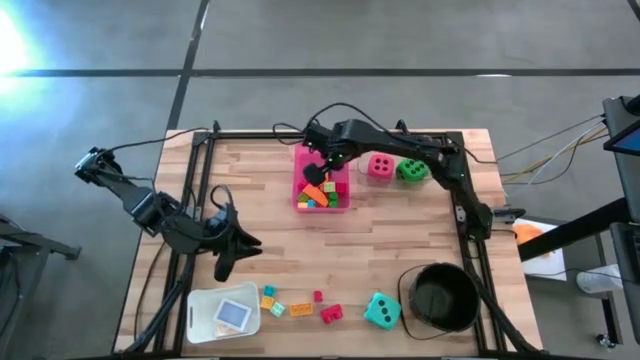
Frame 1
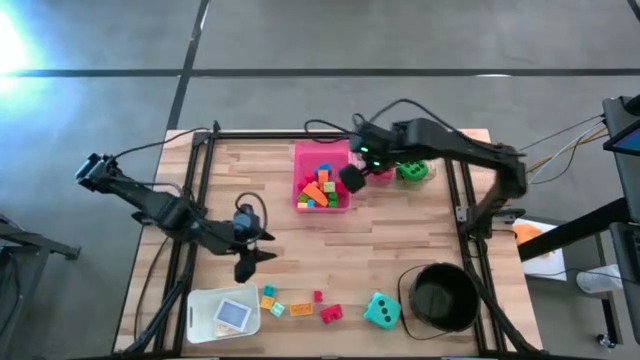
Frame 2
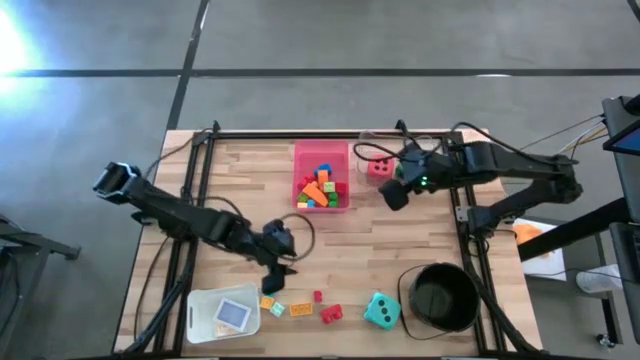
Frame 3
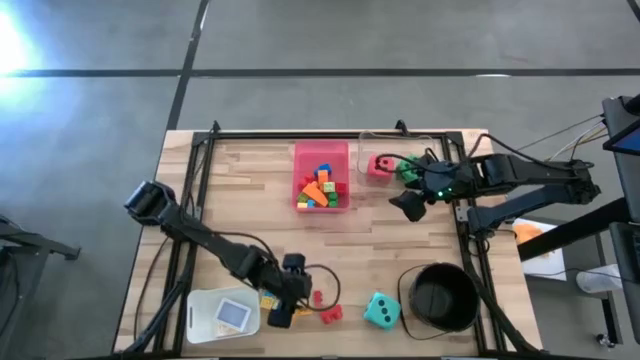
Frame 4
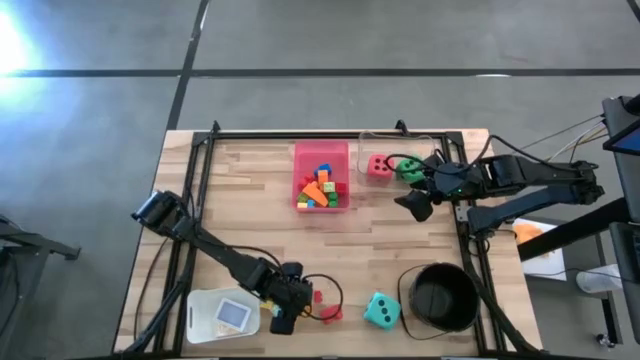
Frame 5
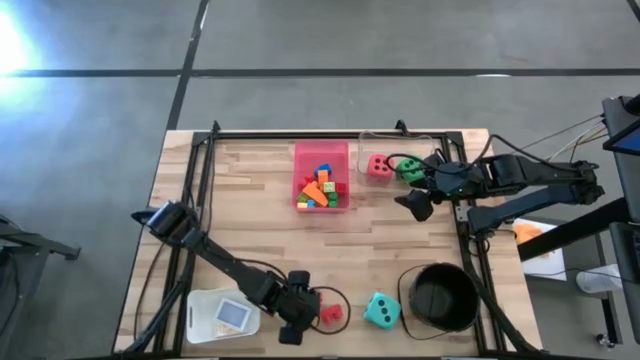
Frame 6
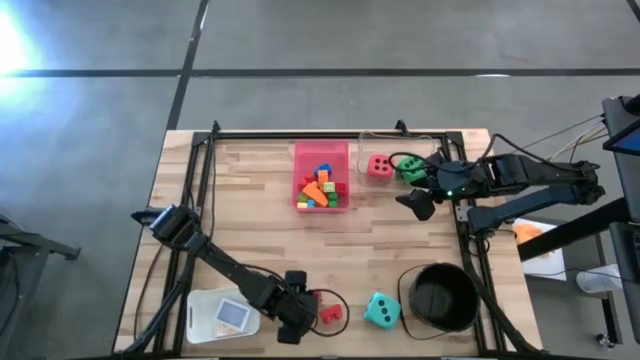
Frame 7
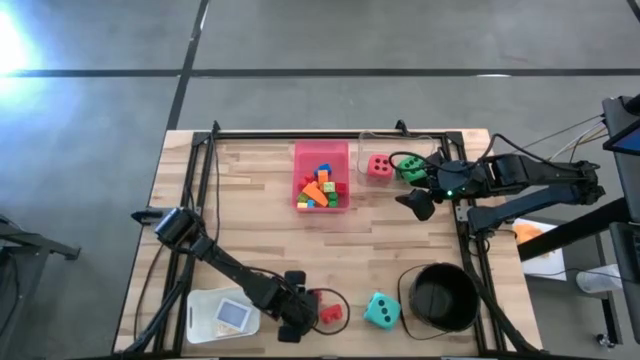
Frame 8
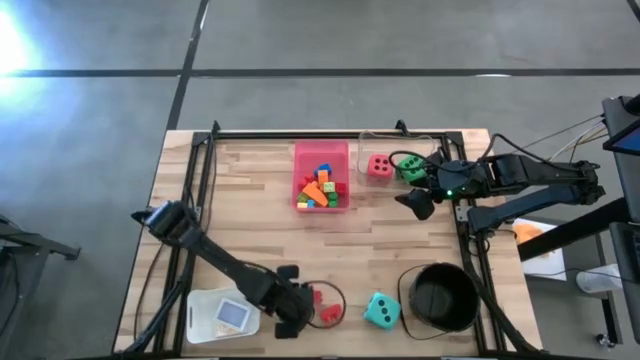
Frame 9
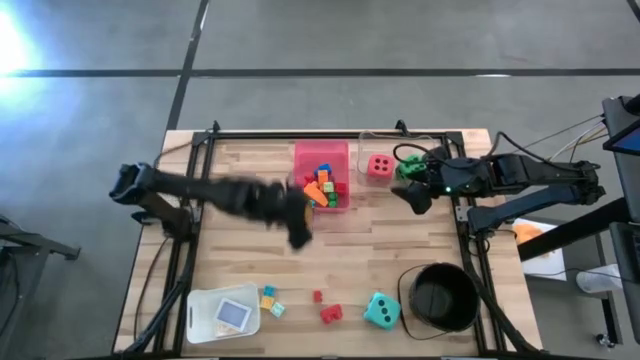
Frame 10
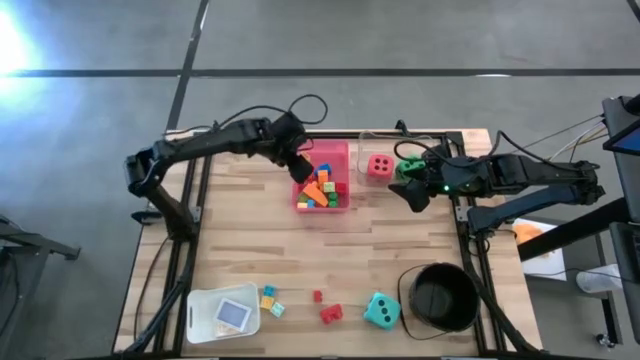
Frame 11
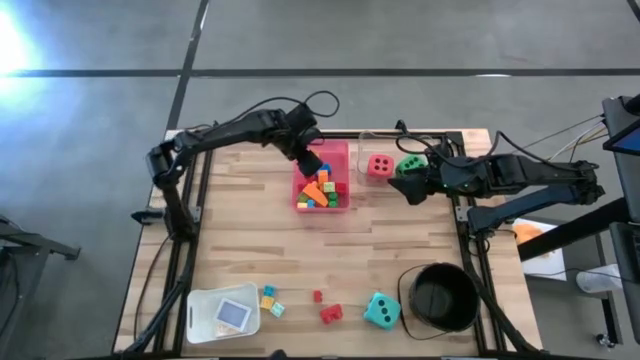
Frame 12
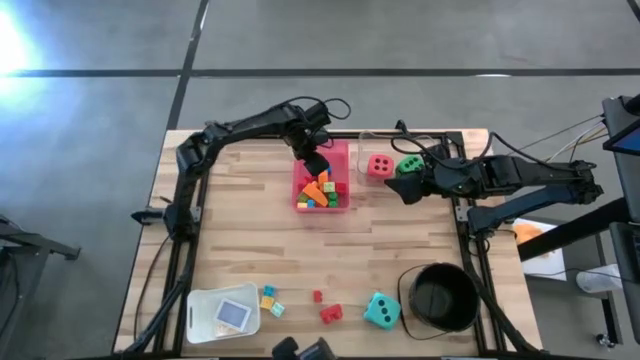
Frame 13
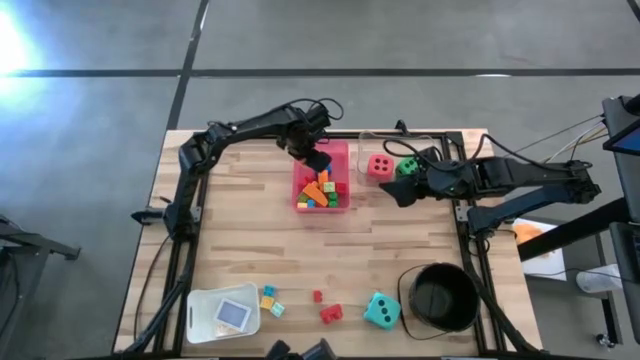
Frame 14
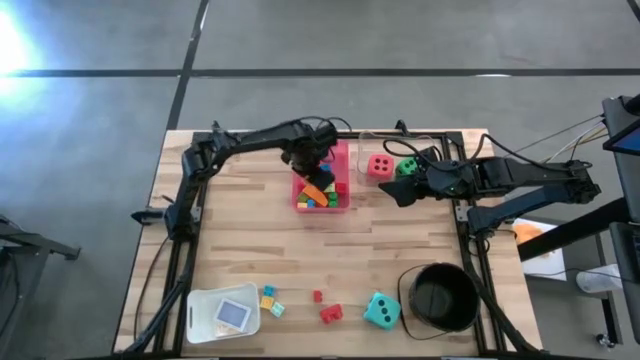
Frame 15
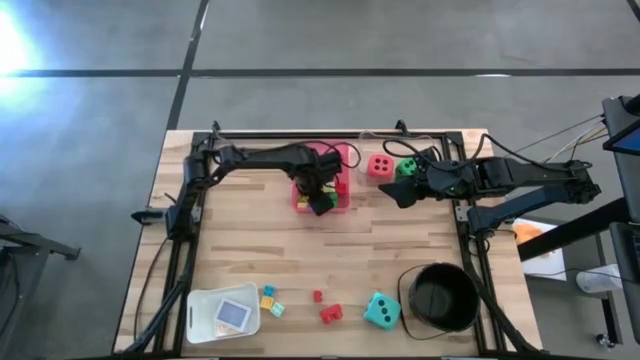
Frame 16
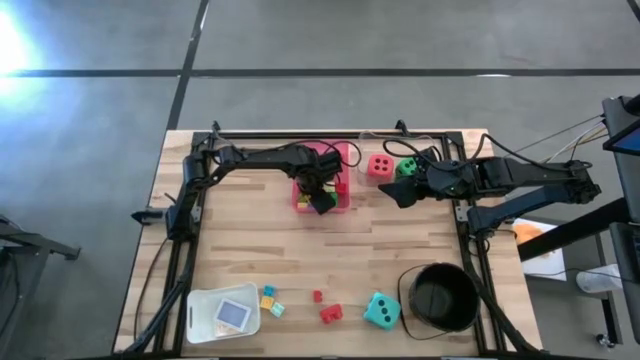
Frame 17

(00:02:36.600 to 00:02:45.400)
Task: Pick & Place Toys
Put the yellow game piece into the red bin

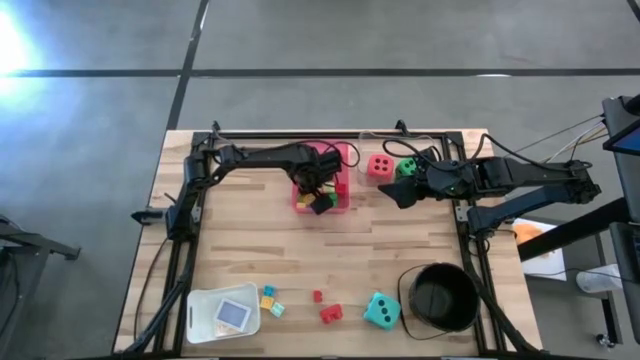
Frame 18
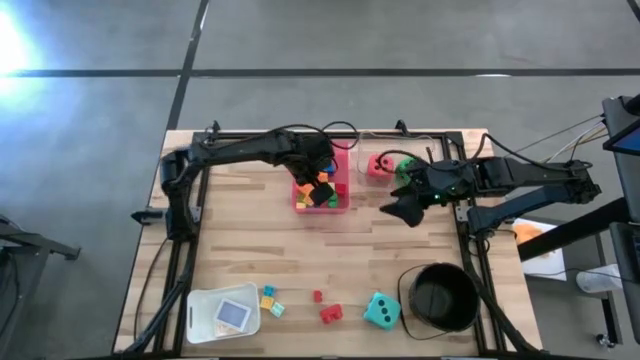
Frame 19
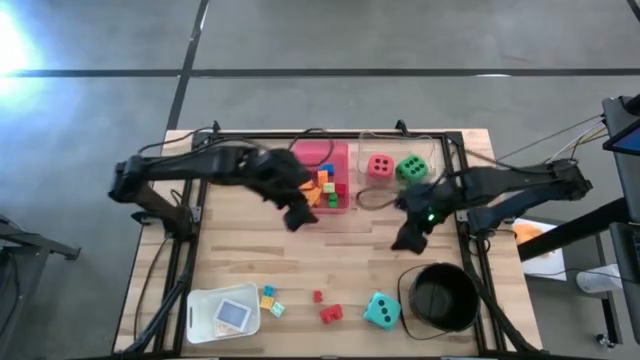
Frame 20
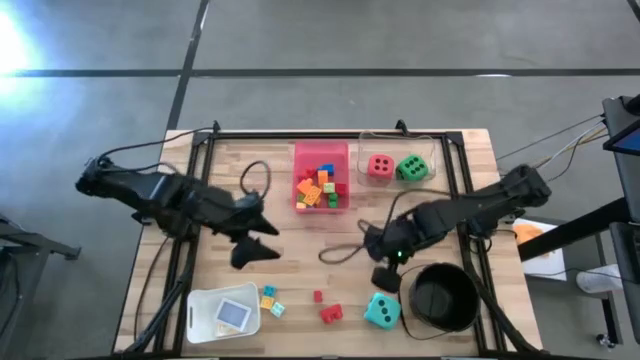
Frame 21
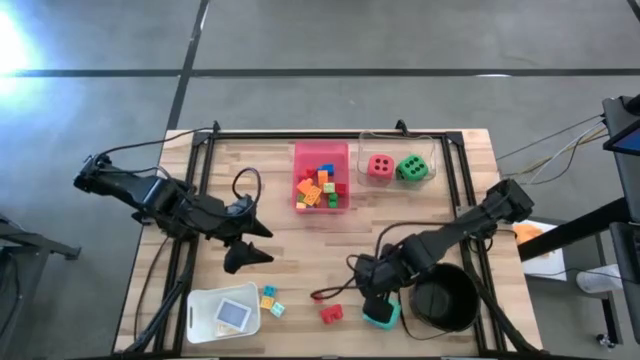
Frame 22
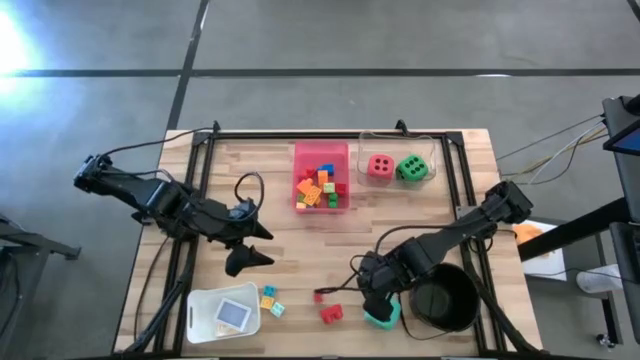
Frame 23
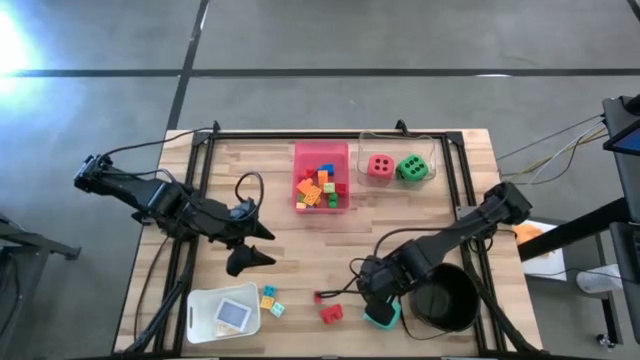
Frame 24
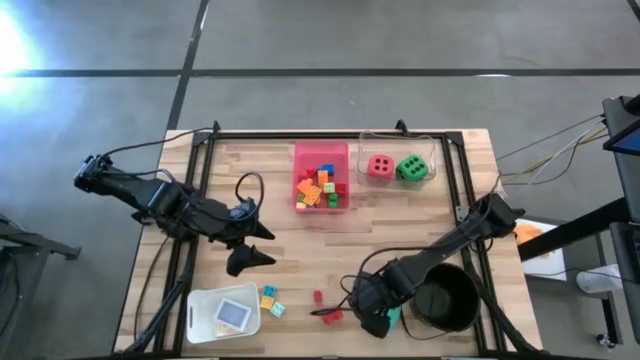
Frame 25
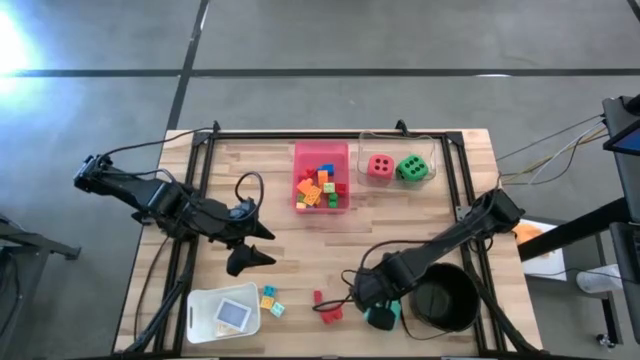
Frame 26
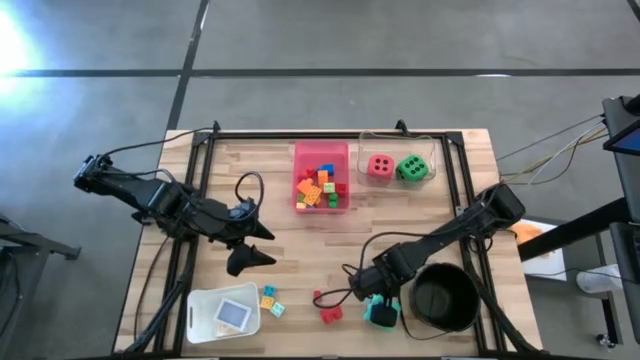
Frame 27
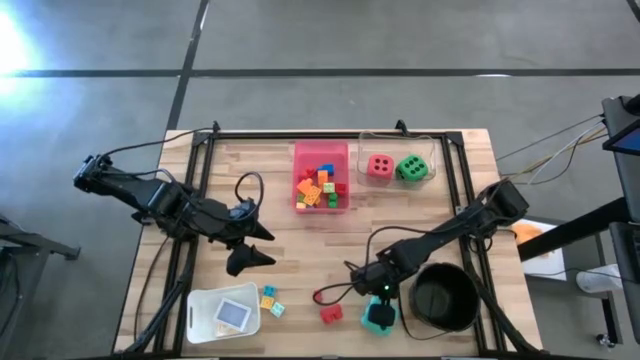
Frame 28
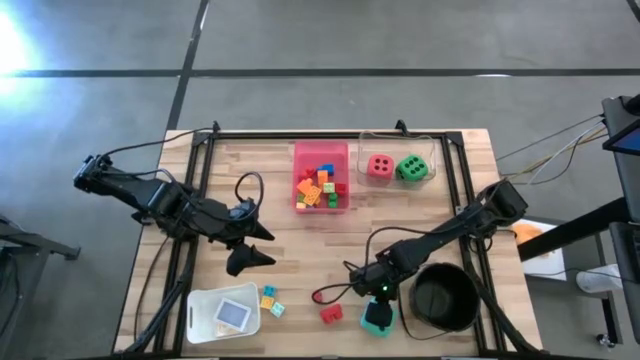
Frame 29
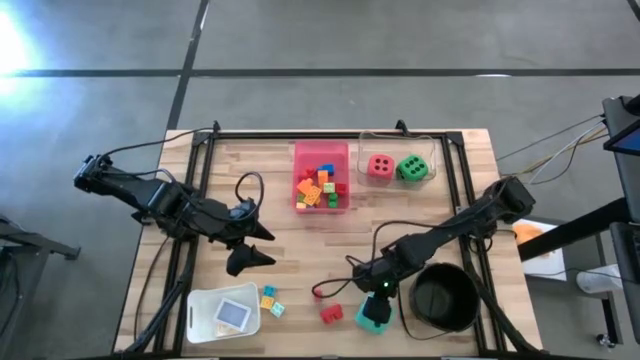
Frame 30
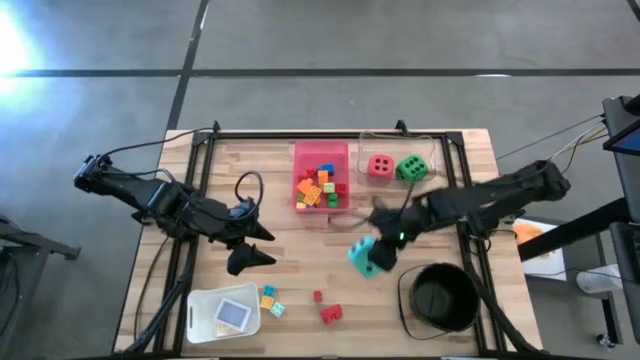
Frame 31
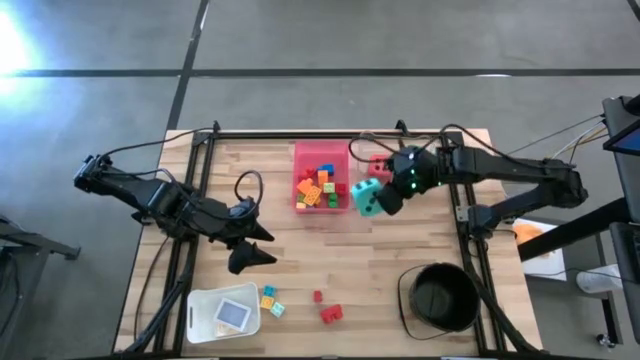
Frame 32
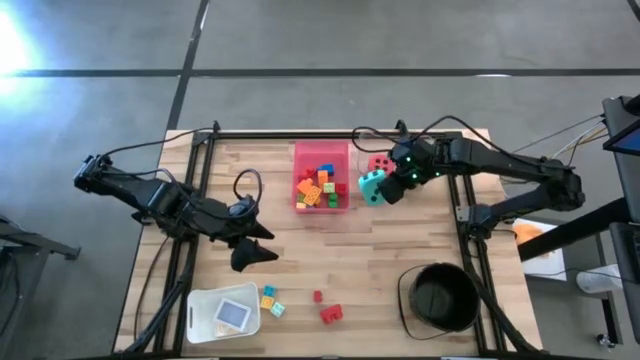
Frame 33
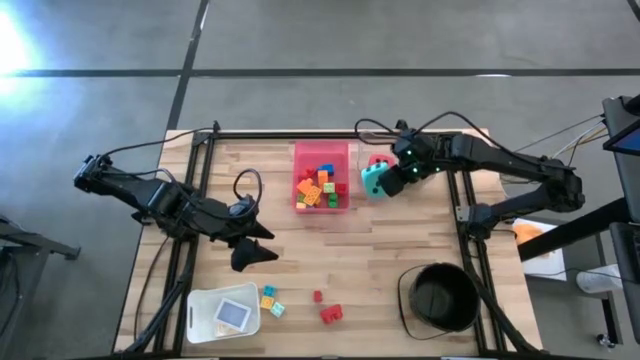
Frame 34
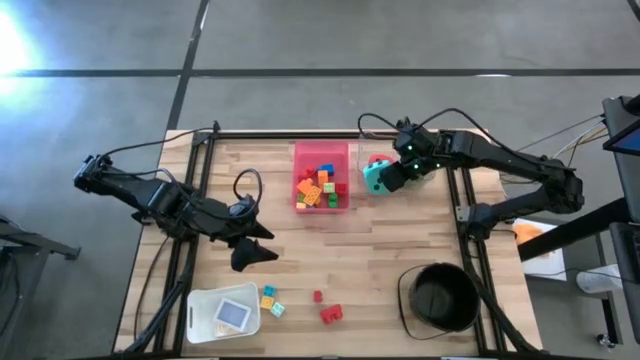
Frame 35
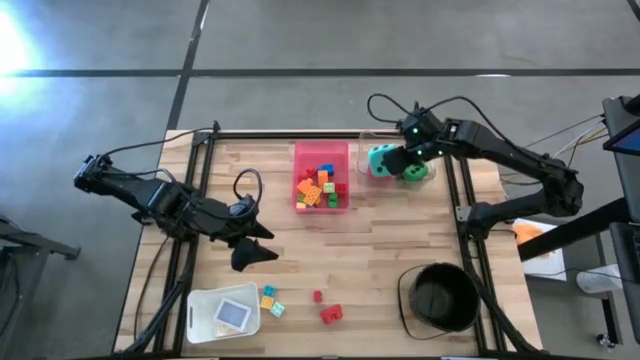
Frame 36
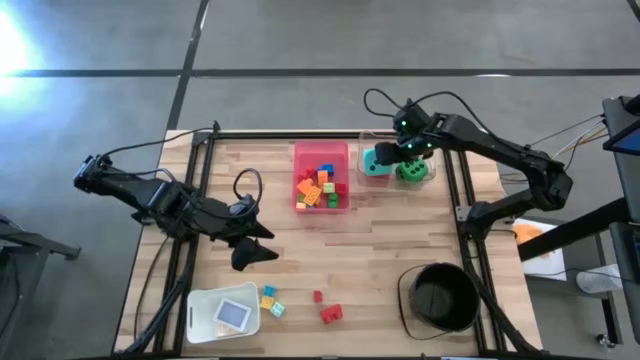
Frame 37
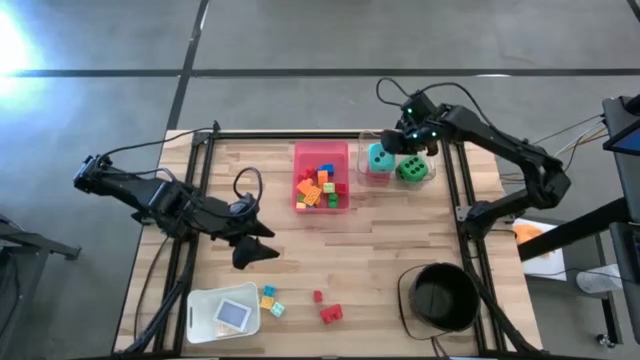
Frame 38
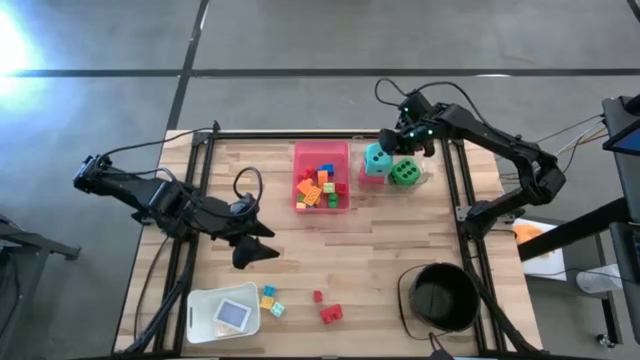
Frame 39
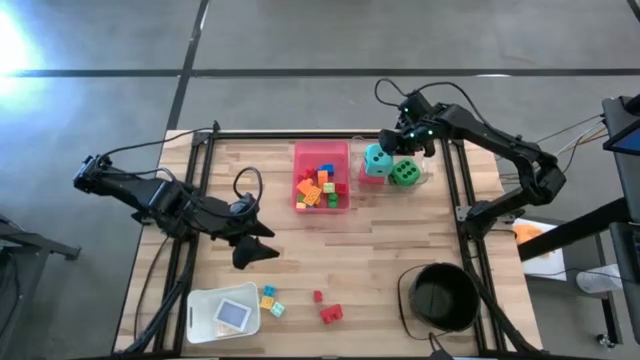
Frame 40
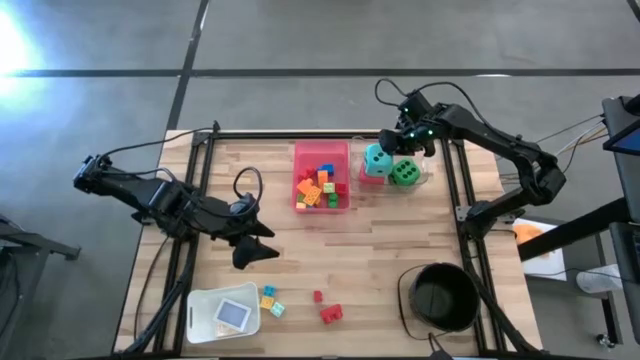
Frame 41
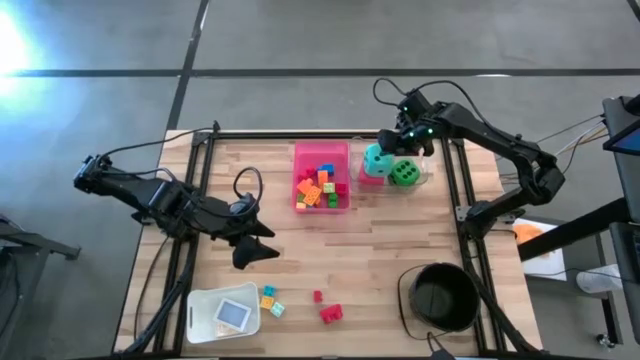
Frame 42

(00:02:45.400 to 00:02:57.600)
Put the blue dice into the transparent bin

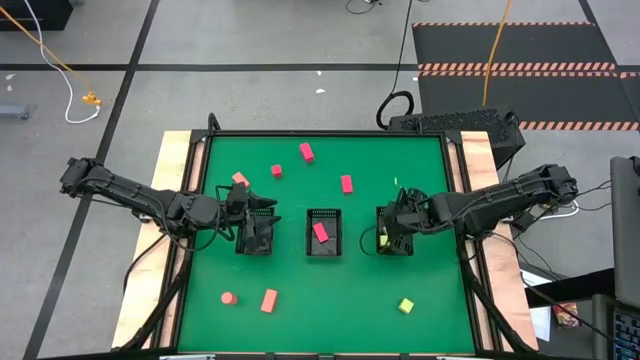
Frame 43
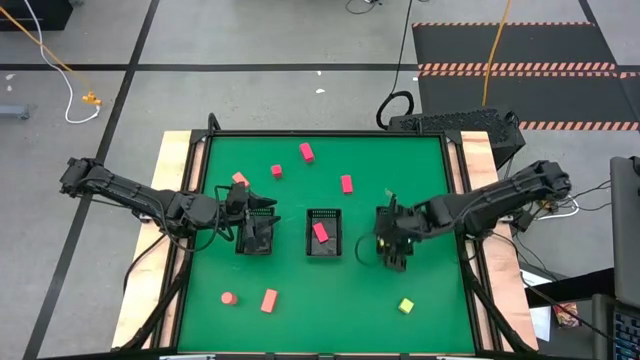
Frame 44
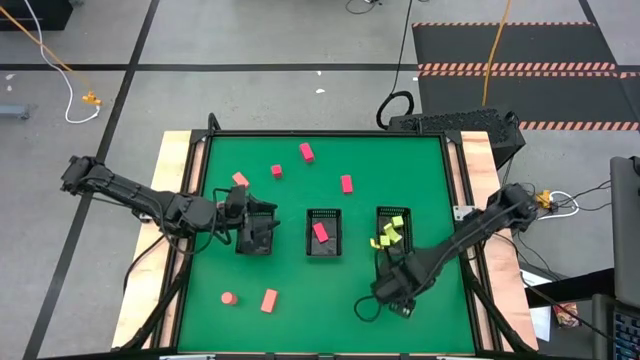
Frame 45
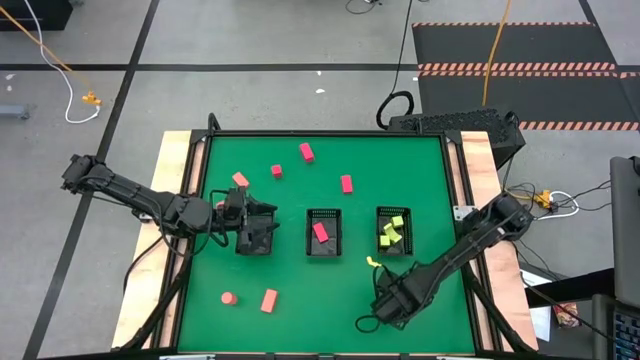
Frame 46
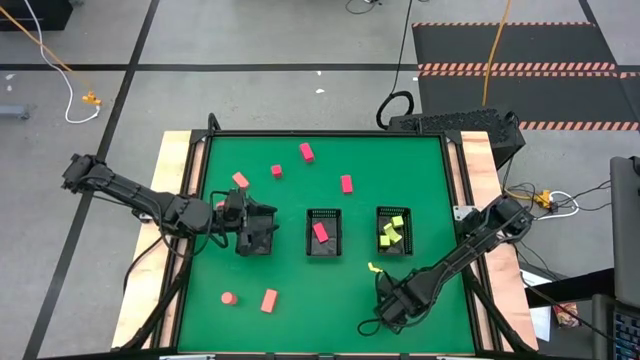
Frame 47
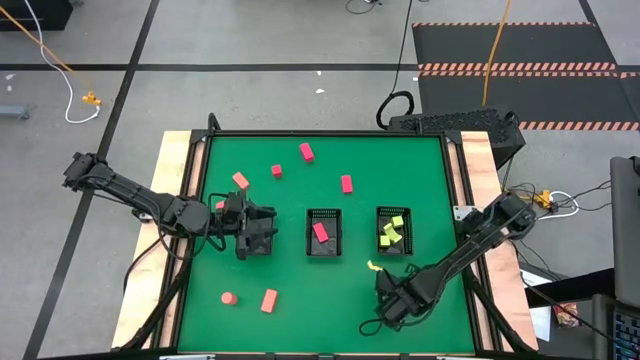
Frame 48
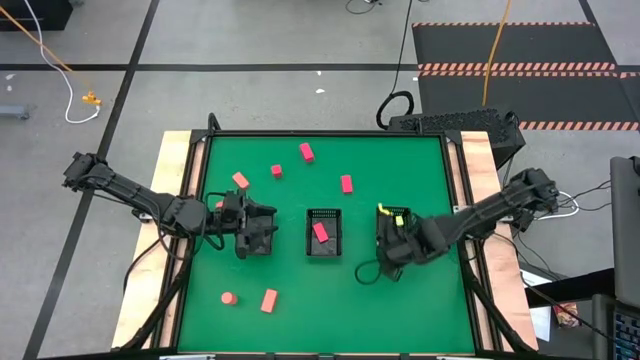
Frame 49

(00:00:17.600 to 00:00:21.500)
Task: Sort & place blocks by color
Put the green block into the right black basket
